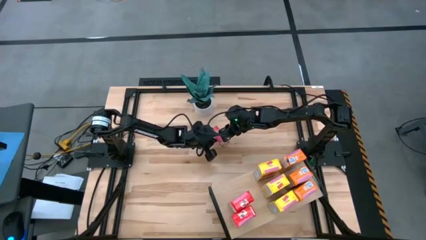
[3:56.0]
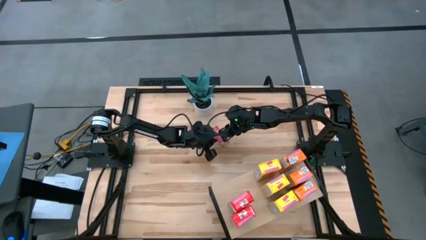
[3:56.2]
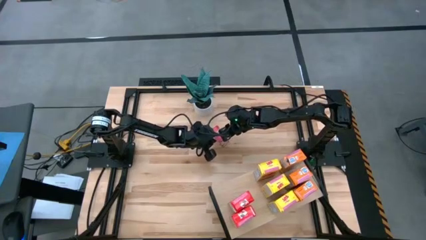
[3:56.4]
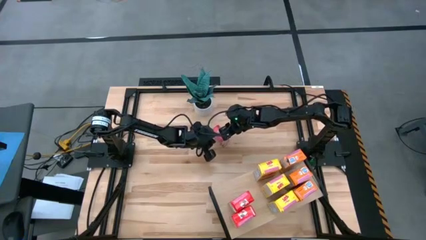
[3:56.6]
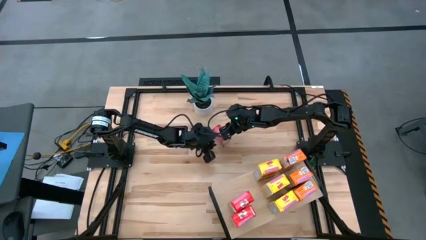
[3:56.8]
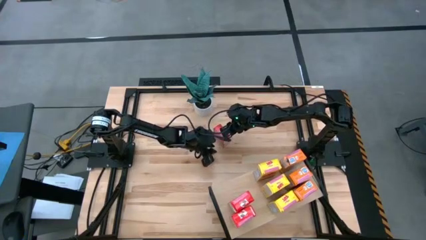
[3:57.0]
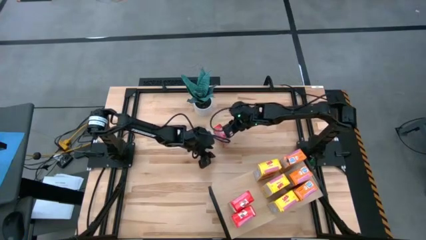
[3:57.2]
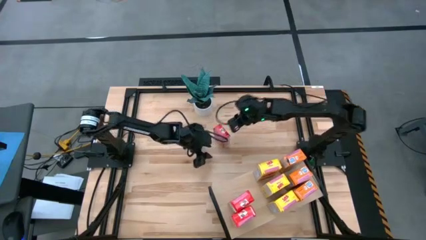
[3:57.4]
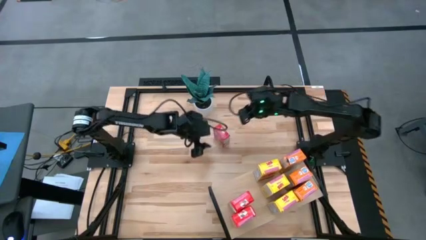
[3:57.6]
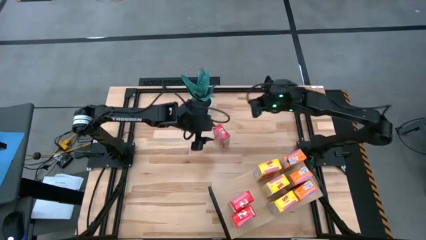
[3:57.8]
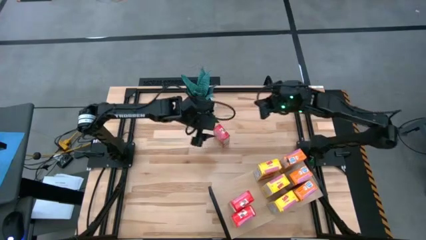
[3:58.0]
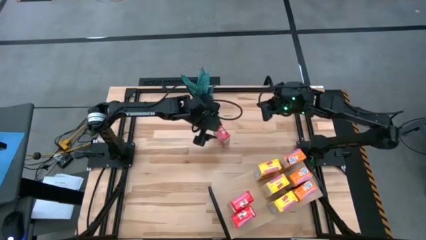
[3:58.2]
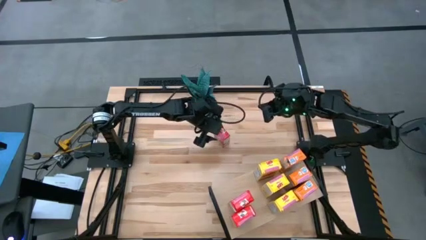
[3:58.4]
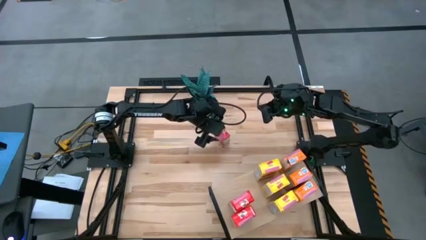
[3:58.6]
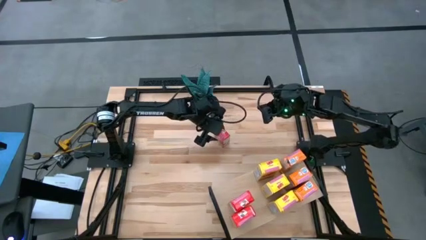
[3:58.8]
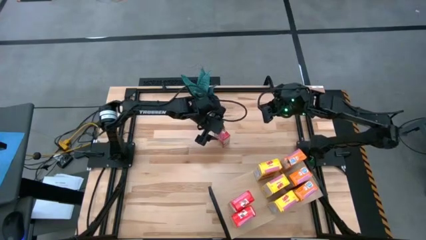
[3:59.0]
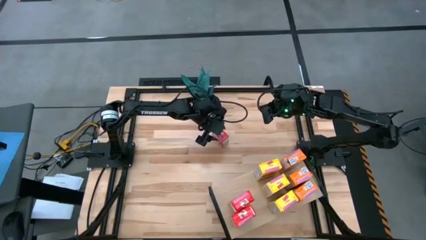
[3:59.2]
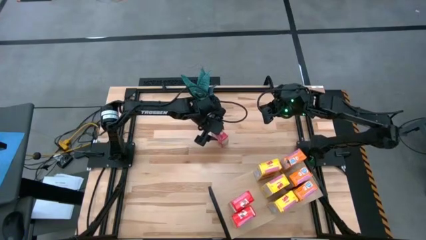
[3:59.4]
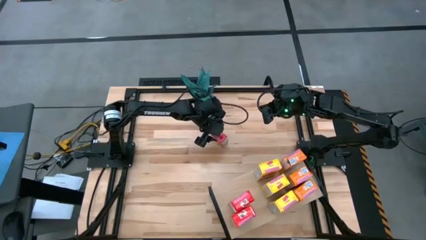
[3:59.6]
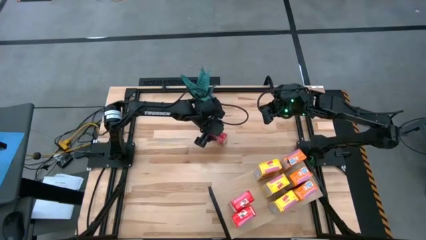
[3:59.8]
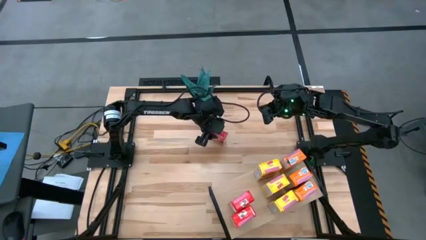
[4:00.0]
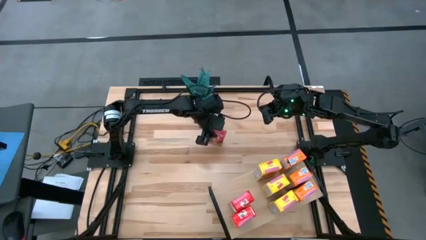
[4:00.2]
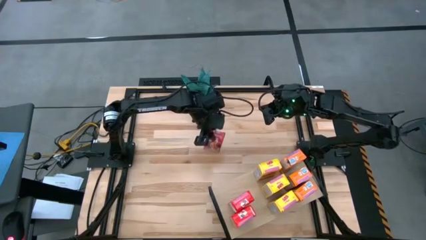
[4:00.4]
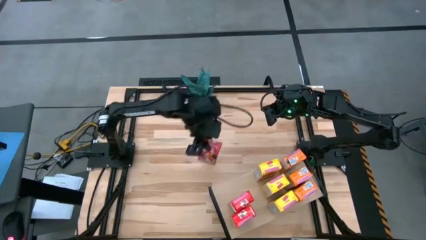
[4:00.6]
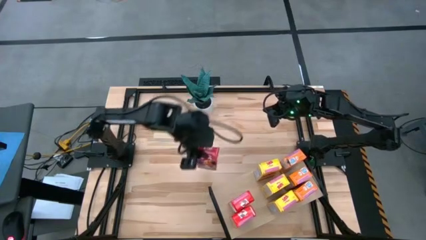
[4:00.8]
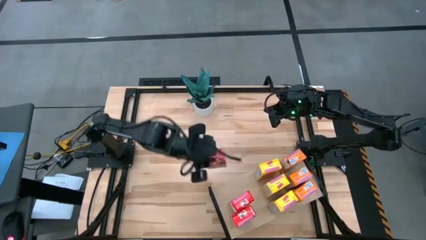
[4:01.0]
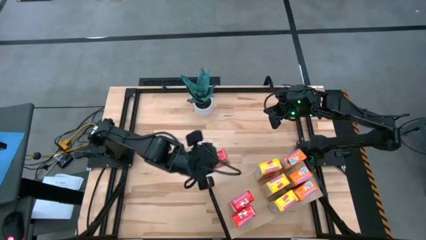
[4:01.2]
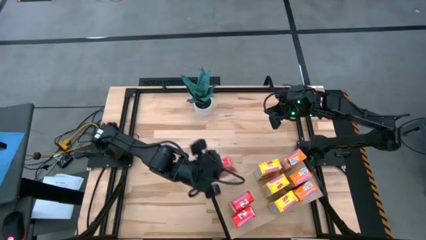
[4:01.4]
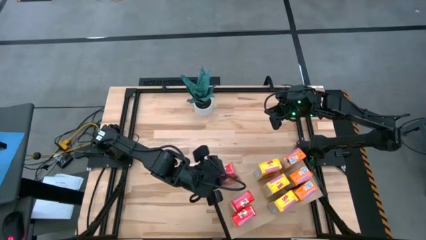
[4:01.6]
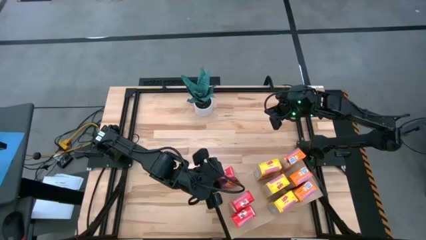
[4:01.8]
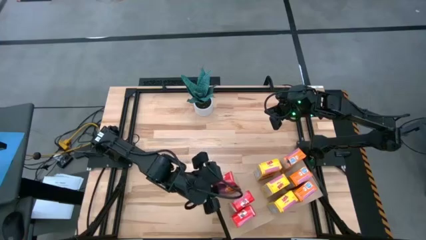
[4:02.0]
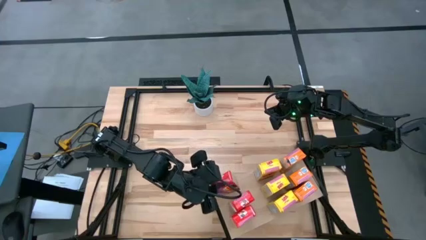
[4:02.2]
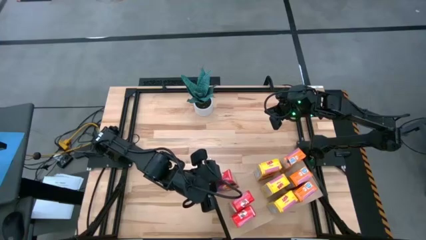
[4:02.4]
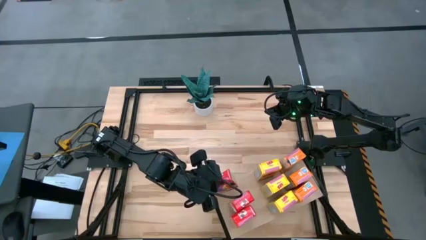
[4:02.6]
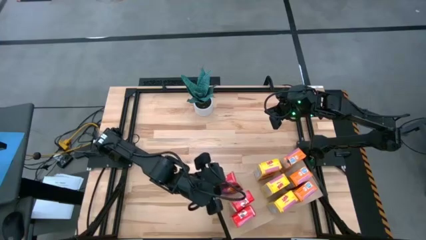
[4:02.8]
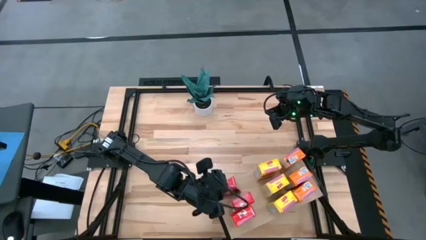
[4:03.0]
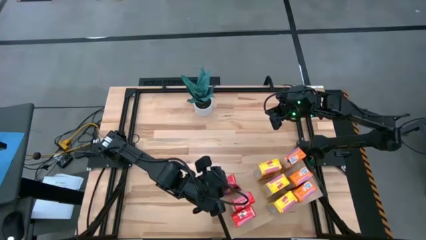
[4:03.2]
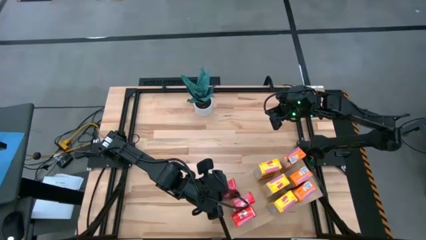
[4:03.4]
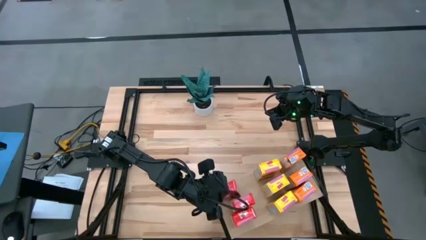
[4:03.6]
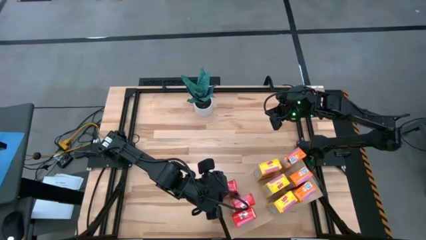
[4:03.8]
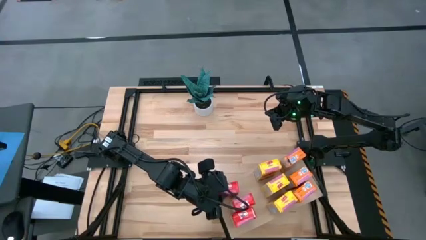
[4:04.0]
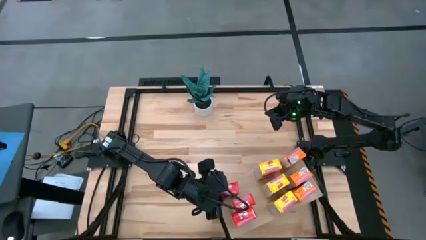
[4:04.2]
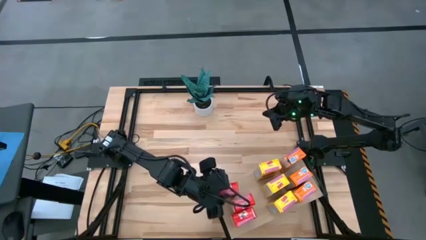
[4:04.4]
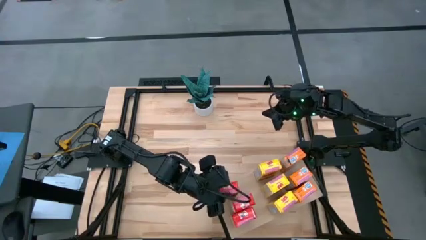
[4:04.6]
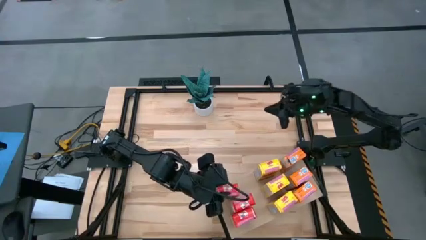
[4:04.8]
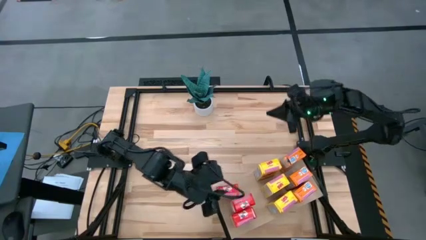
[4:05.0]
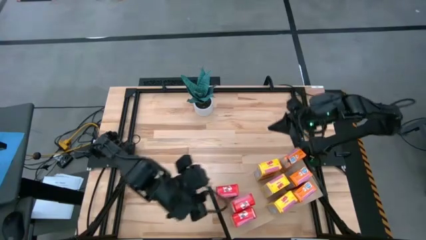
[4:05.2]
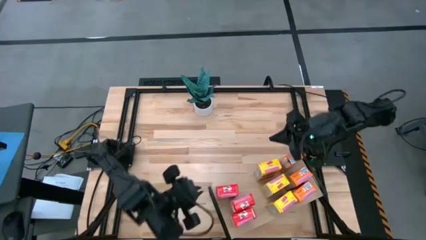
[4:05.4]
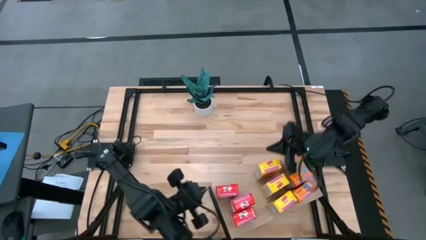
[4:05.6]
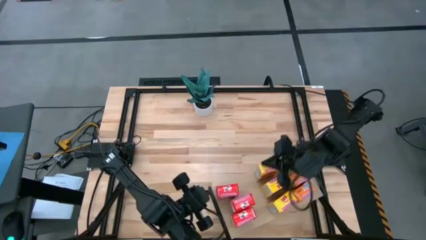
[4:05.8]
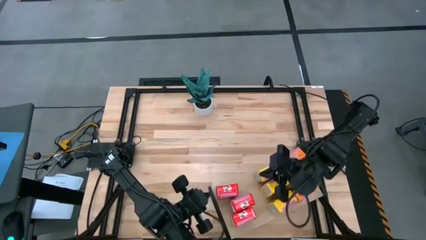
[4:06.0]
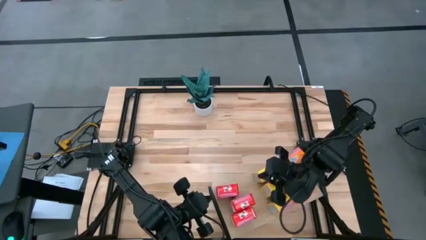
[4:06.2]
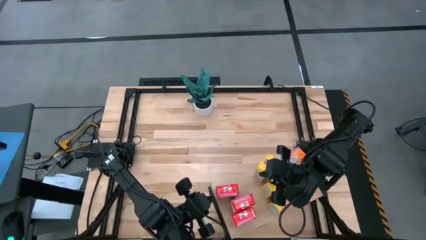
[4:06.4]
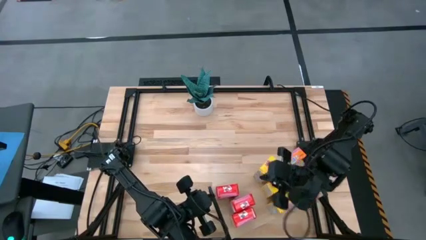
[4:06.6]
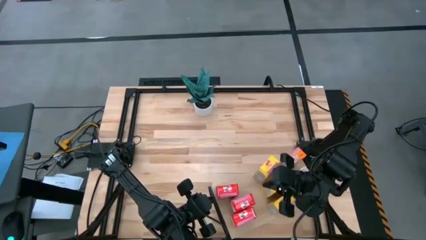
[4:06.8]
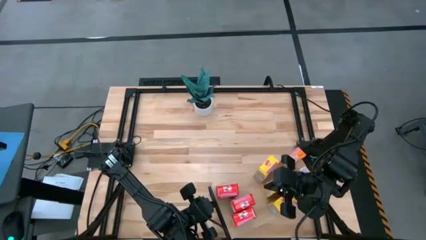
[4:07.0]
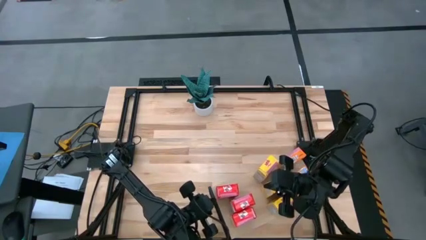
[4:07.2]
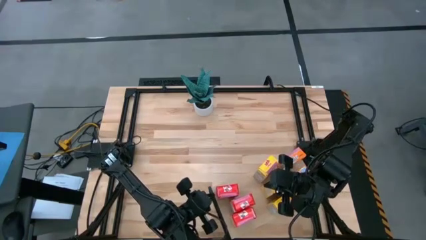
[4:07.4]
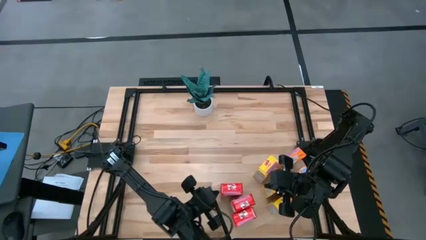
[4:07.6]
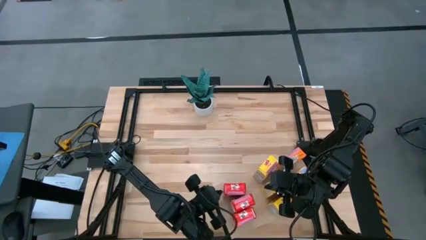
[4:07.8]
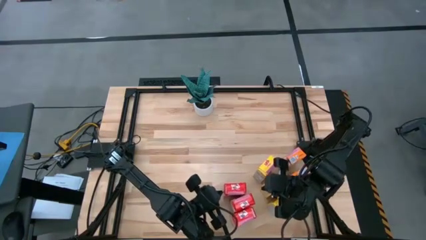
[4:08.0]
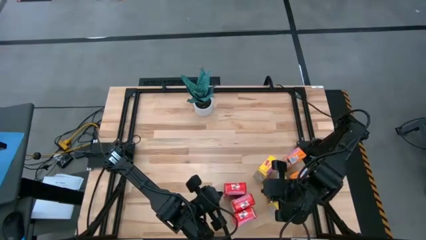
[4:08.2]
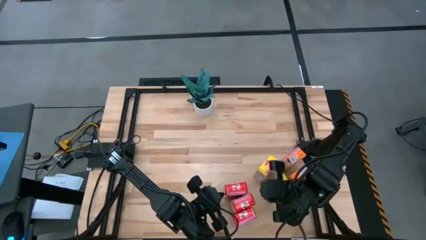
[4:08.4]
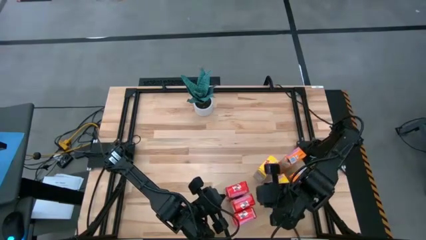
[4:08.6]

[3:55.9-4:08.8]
Task: Stack cereal on shelf
Put the red cereal box on the shelf aligned with the other red cereal boxes
